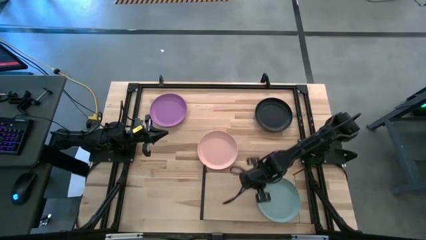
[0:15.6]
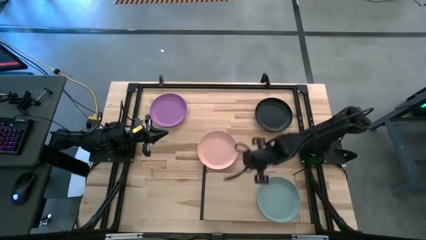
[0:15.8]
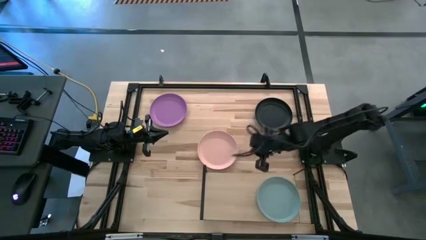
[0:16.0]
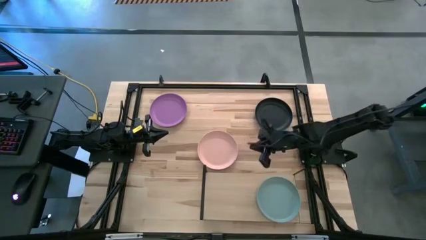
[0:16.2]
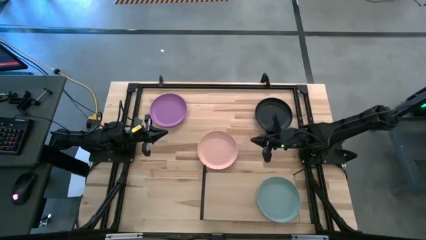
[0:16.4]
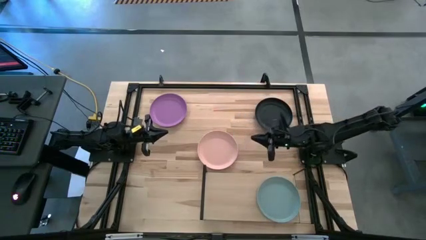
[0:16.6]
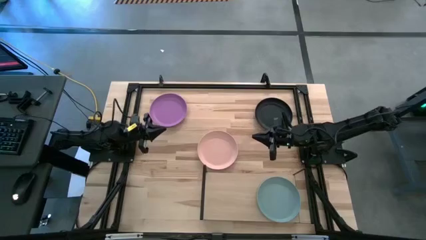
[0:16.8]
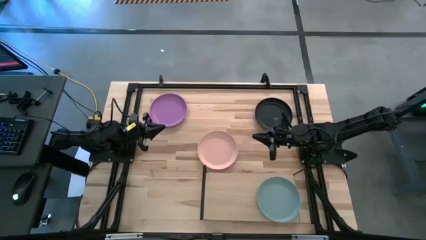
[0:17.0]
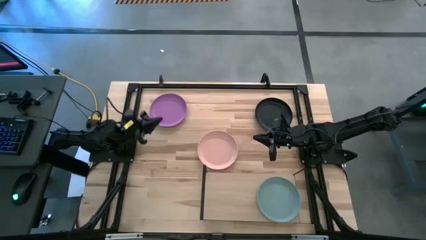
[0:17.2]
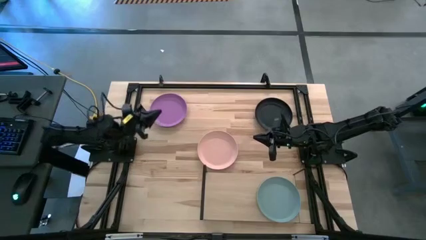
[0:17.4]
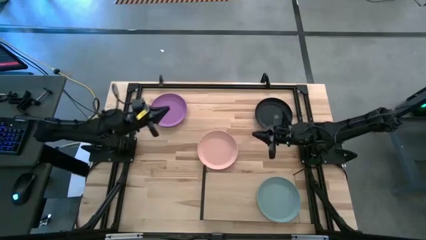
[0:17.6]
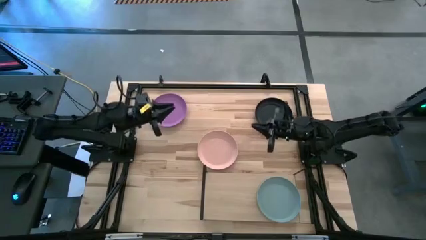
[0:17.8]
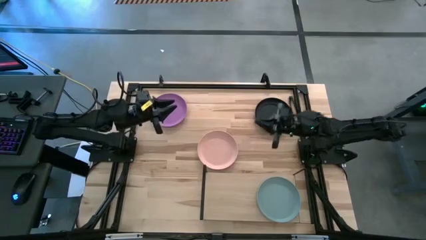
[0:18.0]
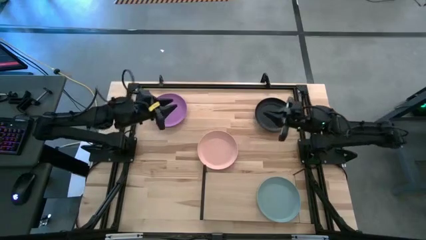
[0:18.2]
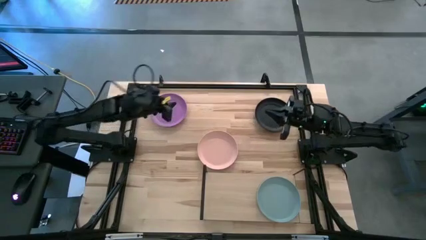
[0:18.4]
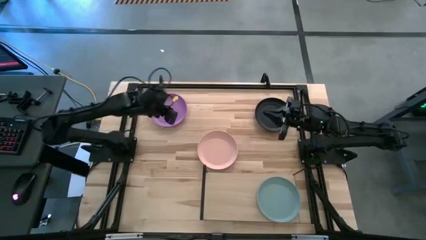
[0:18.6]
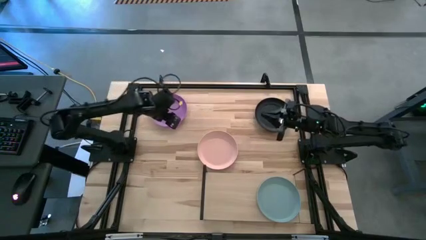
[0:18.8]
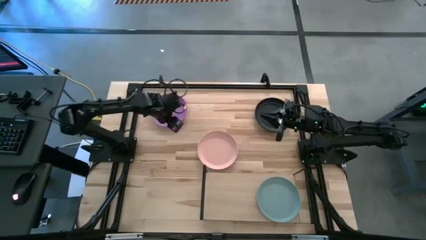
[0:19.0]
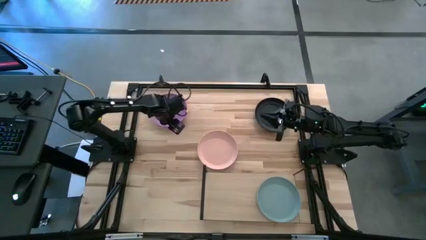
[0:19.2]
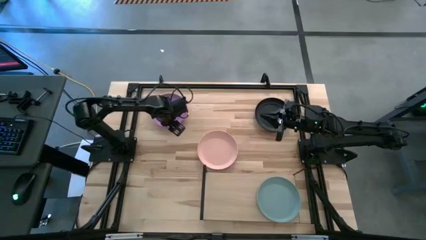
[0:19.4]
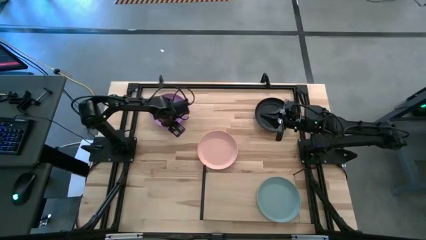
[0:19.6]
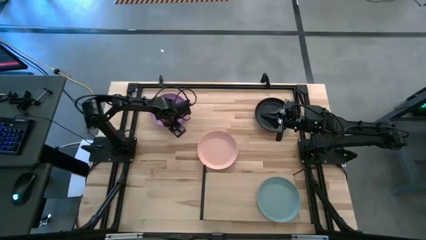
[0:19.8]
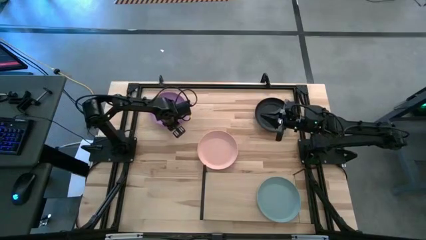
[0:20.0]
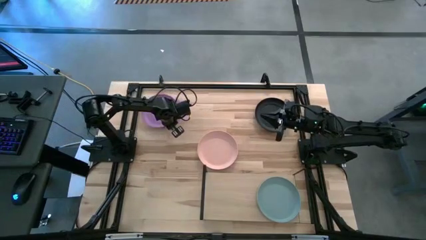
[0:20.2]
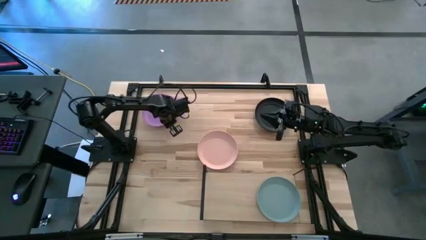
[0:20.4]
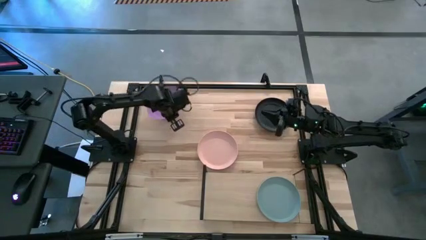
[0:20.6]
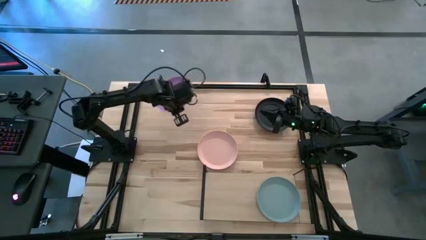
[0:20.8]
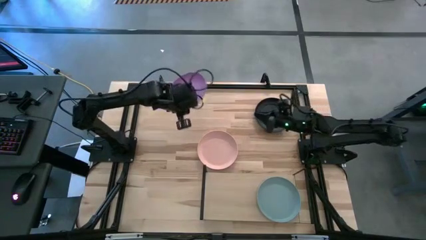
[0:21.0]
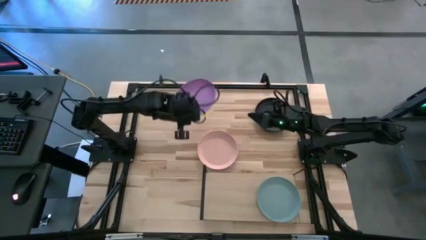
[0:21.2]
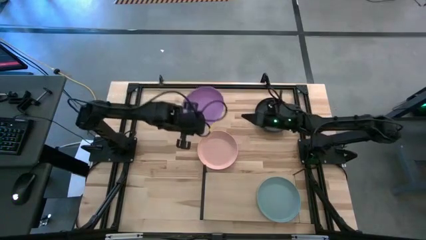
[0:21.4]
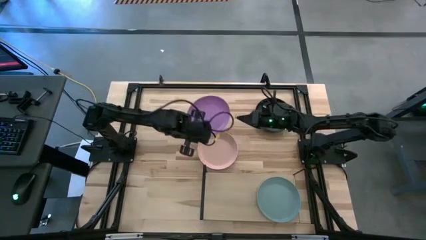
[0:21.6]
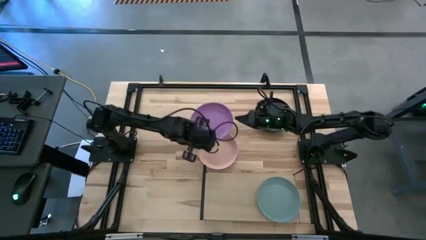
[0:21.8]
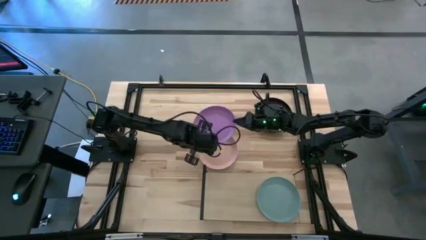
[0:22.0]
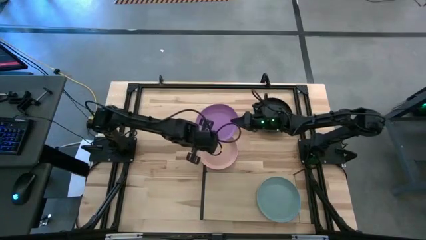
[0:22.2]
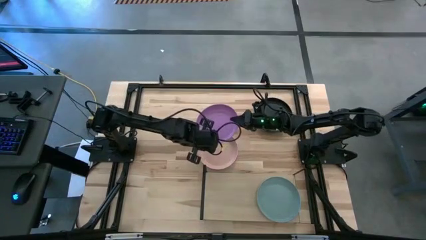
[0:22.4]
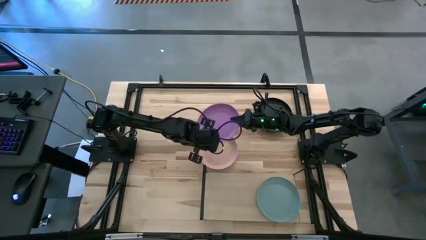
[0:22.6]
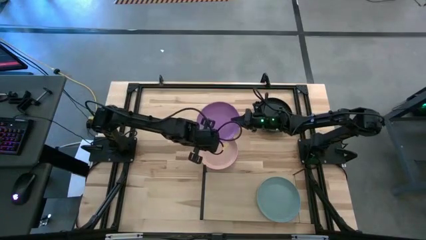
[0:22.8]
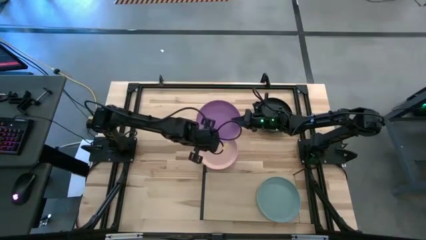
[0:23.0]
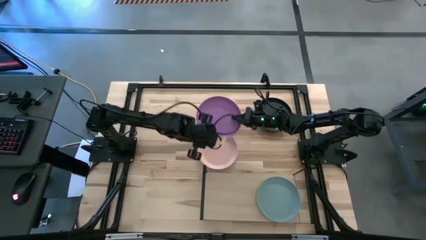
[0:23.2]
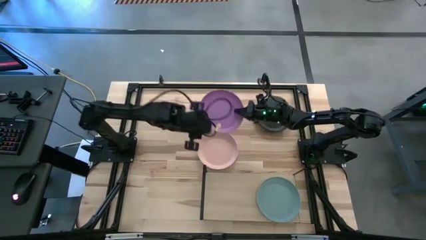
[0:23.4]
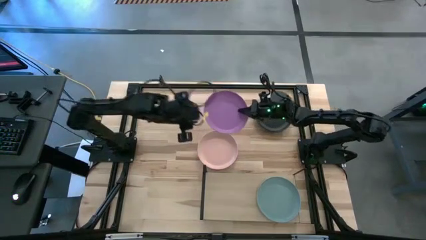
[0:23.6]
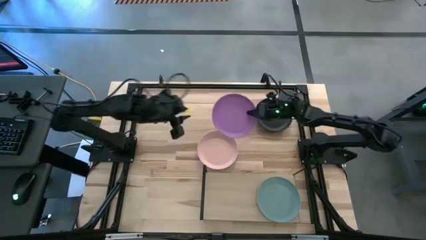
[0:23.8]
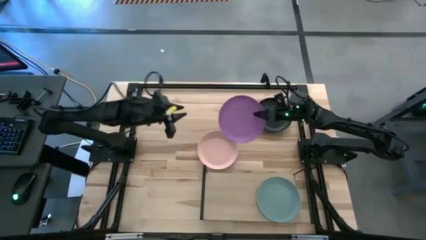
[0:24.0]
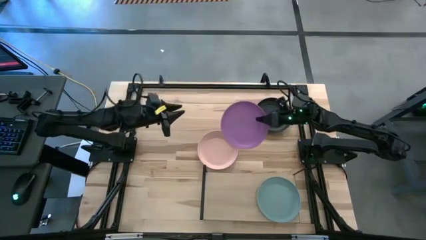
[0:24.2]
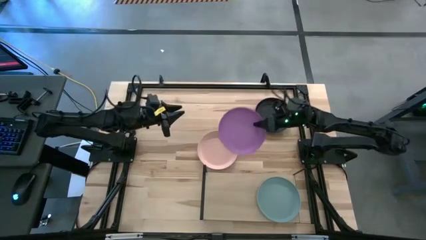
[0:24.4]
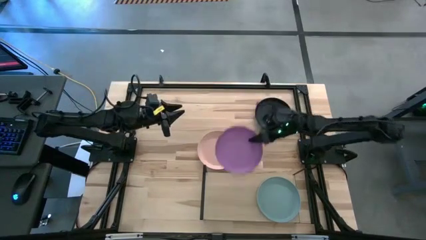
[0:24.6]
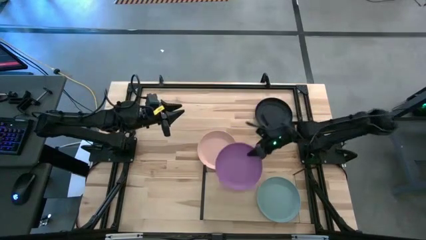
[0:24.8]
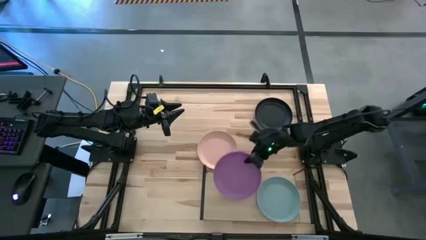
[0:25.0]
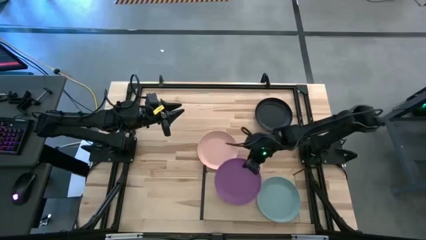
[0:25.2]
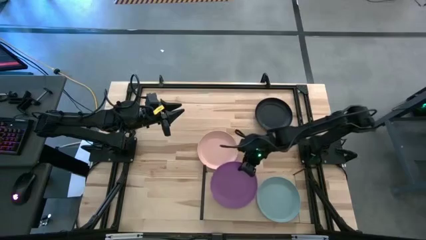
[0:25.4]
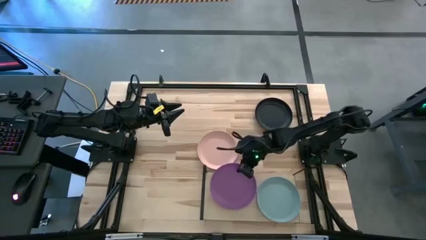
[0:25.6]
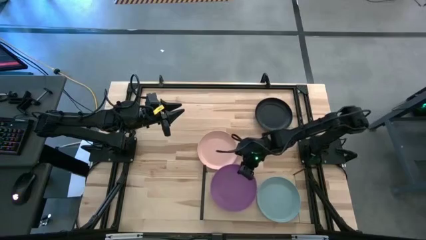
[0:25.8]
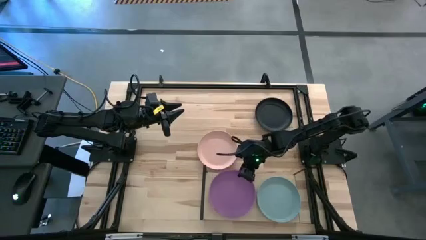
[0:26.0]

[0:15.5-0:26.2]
Task: Place and stack plates onto a shelf
Put the purple plate on the shelf

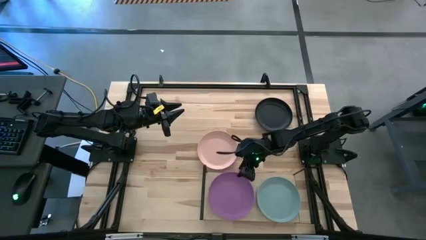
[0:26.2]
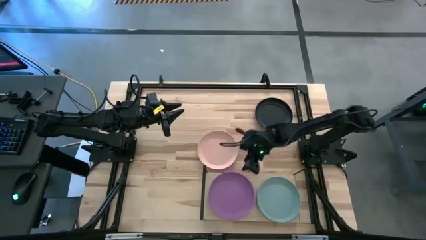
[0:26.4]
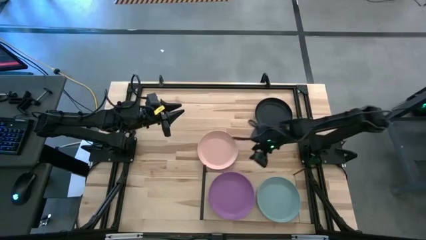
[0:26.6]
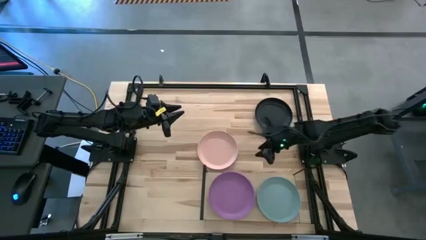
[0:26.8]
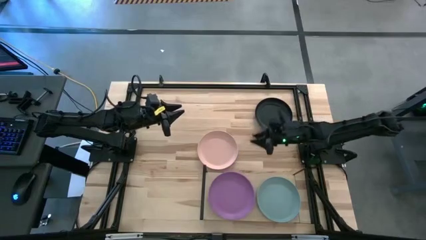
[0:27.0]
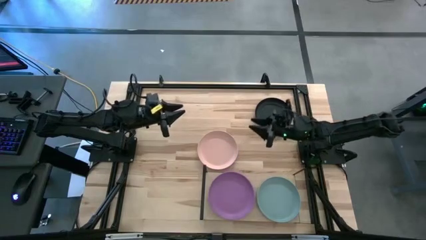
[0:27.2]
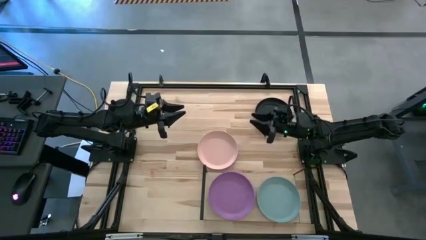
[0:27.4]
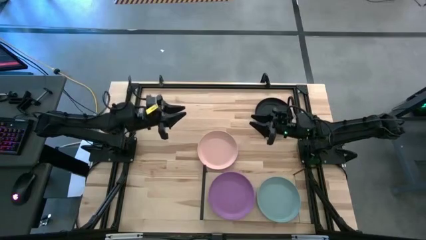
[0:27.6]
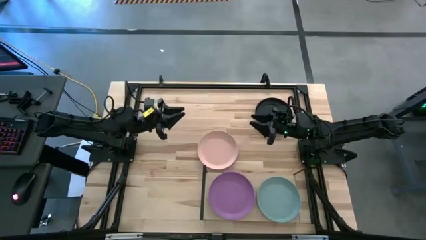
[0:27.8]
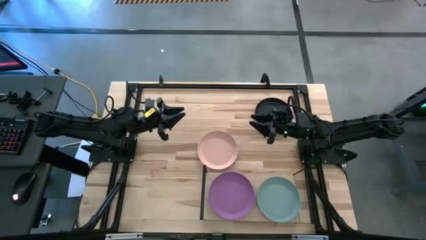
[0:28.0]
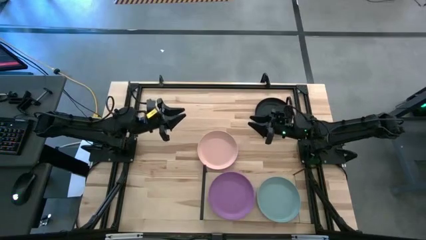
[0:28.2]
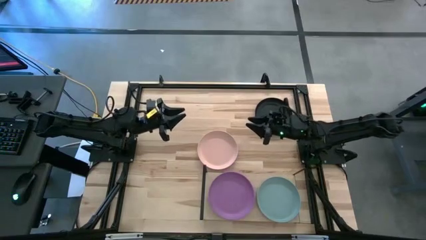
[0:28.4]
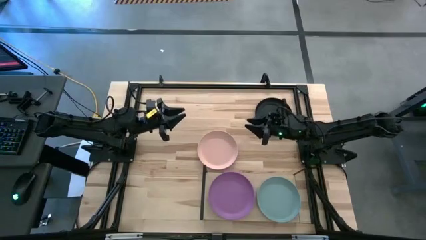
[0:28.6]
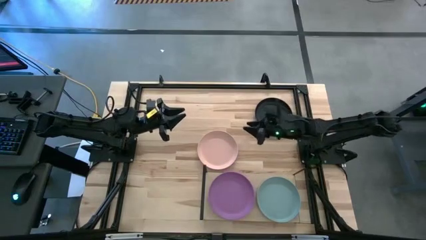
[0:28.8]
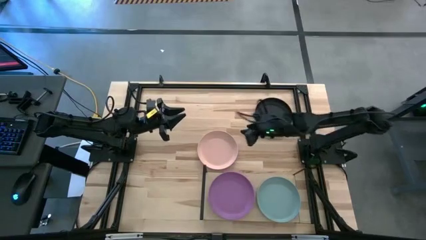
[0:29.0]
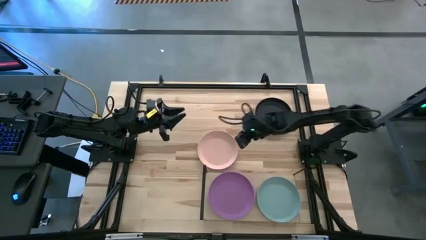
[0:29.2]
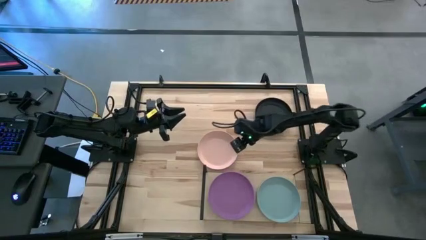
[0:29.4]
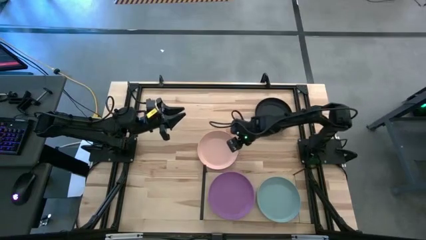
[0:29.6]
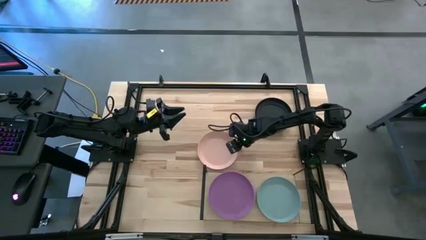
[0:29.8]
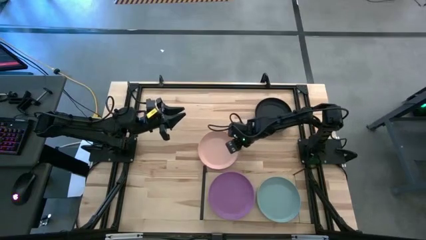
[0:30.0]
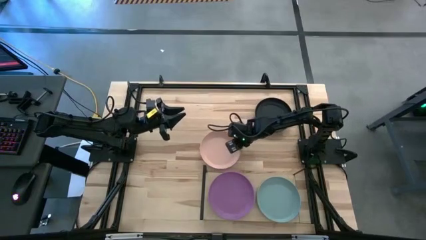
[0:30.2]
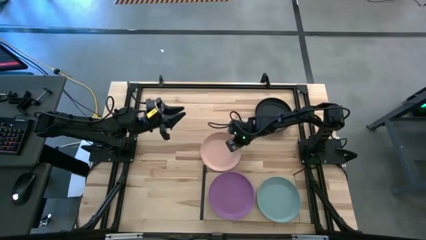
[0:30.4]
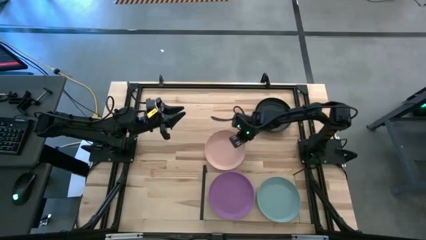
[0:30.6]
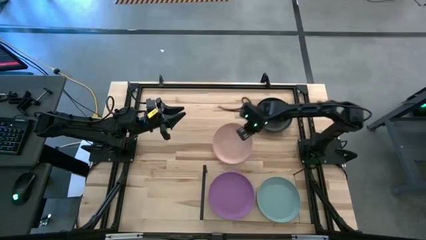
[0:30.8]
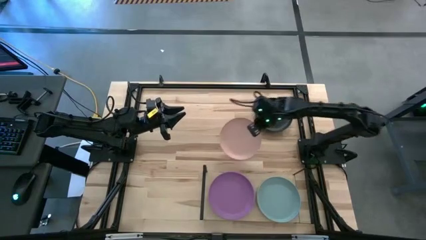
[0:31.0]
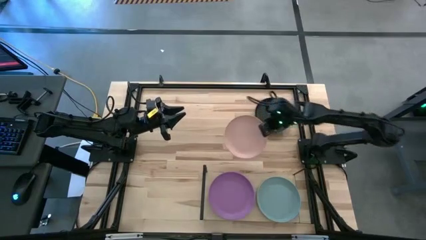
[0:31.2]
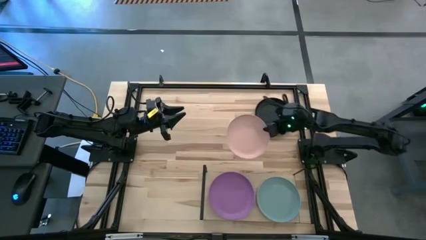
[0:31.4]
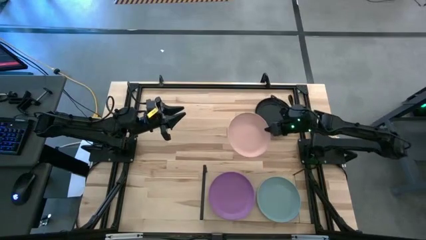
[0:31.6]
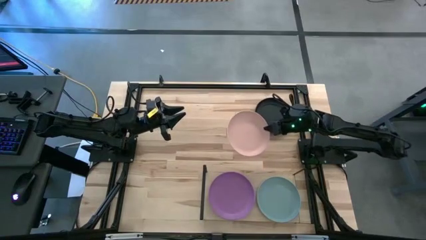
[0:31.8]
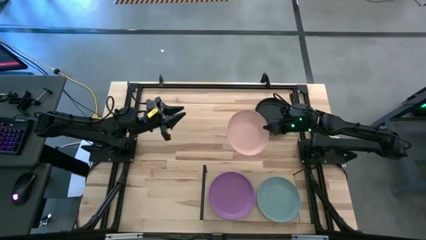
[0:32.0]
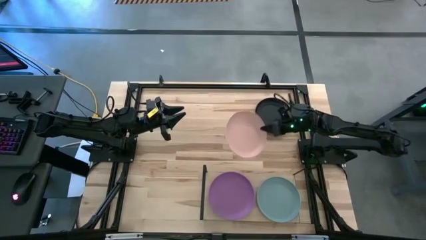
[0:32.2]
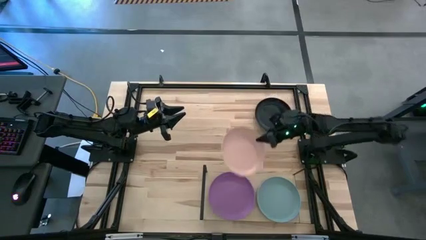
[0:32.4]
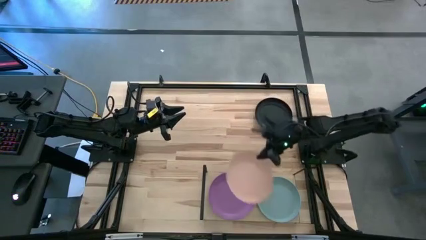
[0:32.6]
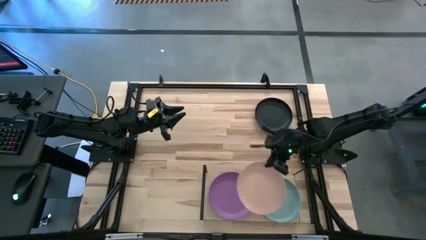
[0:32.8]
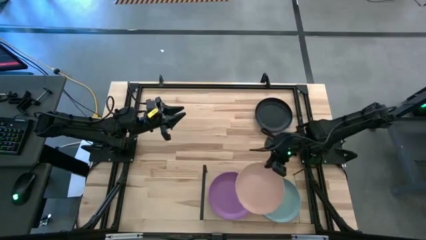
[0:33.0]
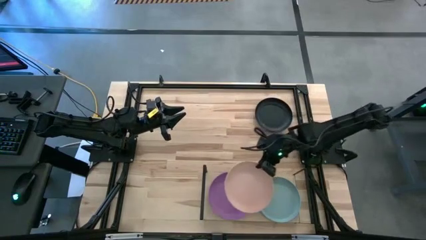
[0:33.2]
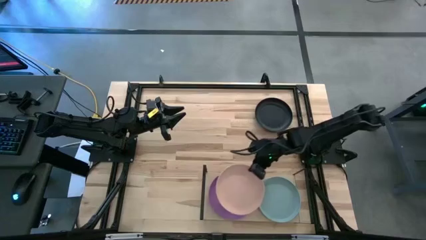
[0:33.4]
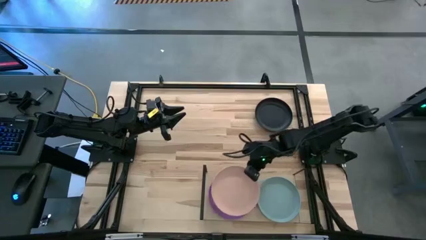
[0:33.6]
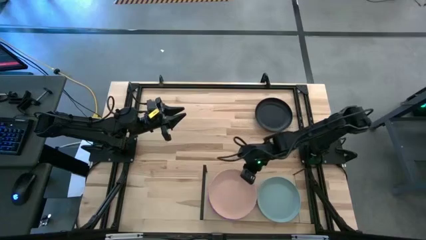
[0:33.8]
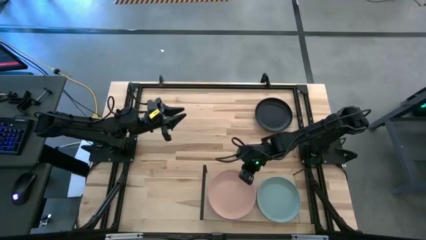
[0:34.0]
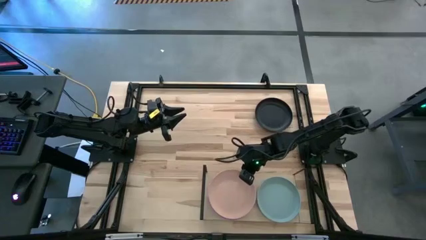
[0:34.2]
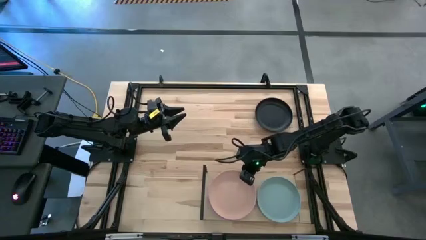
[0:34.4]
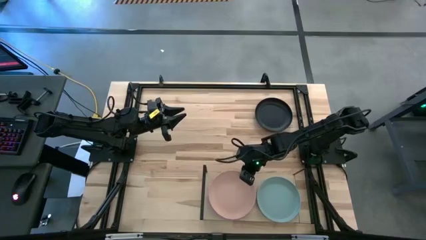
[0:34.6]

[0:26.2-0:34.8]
Stack the orange plate on the purple plate on the shelf
